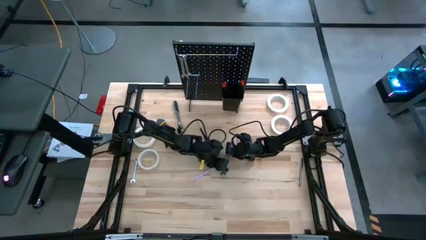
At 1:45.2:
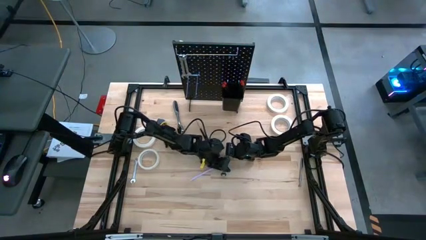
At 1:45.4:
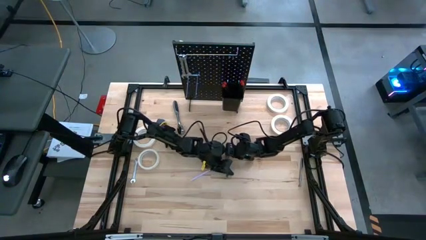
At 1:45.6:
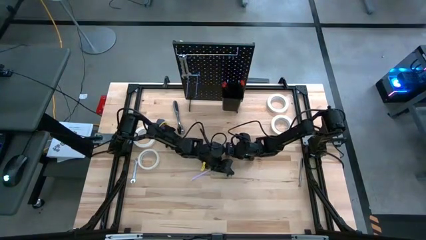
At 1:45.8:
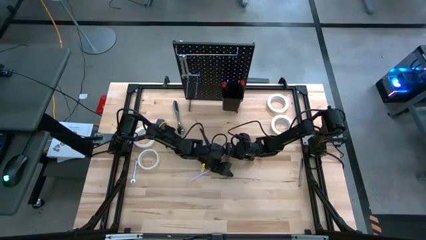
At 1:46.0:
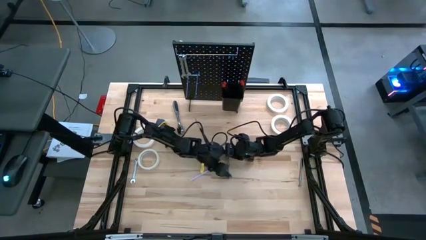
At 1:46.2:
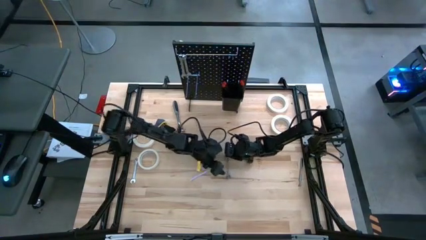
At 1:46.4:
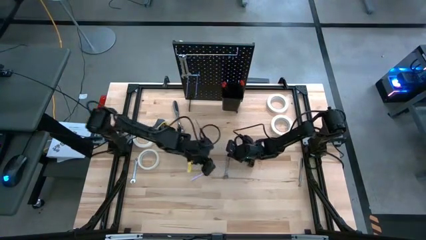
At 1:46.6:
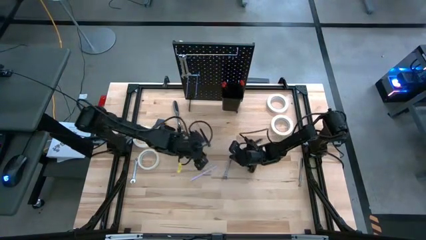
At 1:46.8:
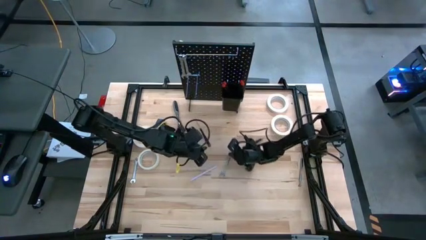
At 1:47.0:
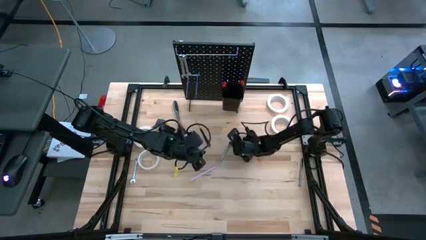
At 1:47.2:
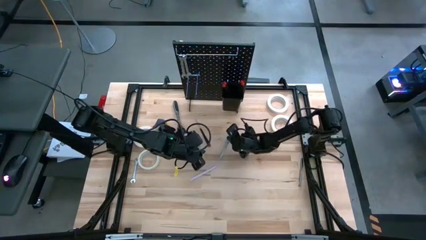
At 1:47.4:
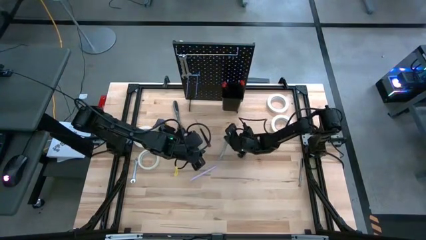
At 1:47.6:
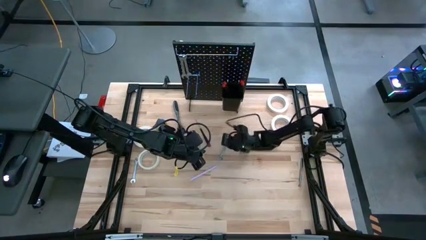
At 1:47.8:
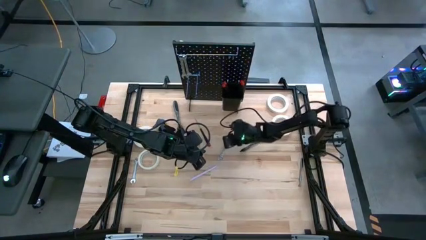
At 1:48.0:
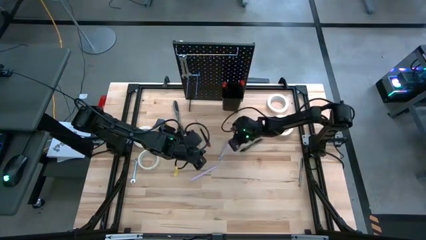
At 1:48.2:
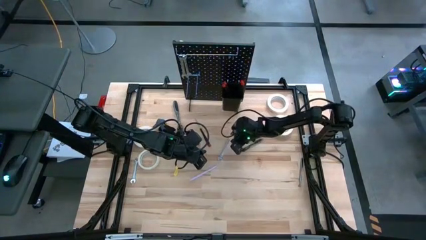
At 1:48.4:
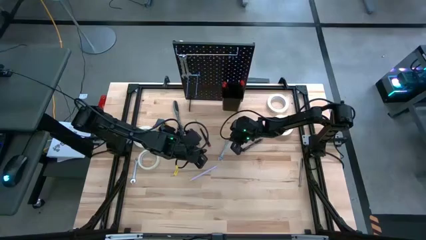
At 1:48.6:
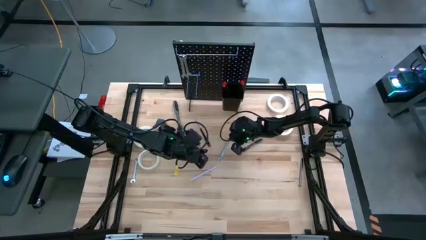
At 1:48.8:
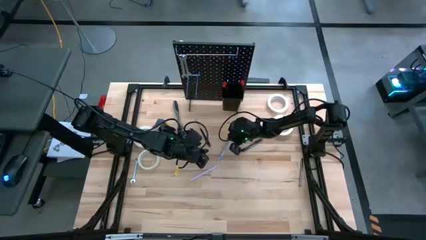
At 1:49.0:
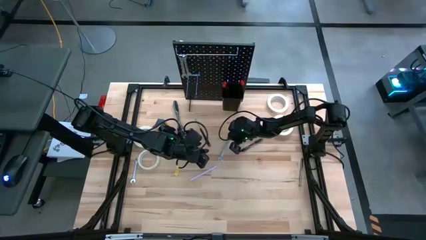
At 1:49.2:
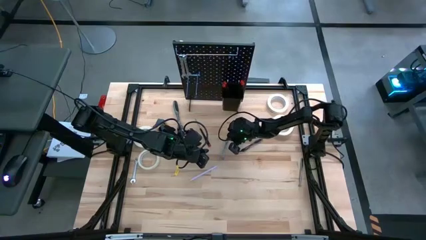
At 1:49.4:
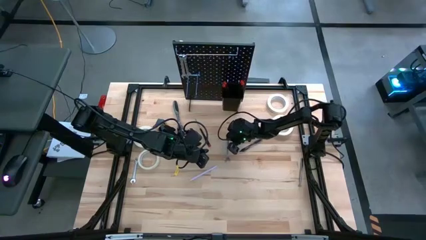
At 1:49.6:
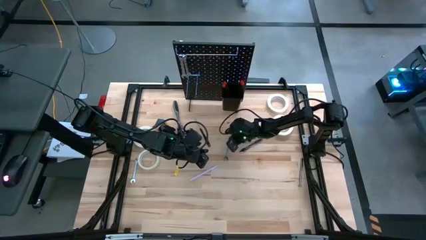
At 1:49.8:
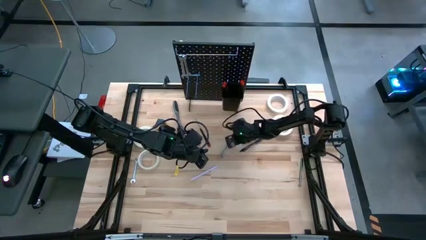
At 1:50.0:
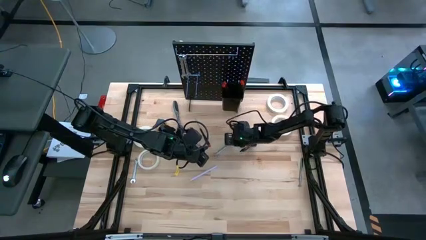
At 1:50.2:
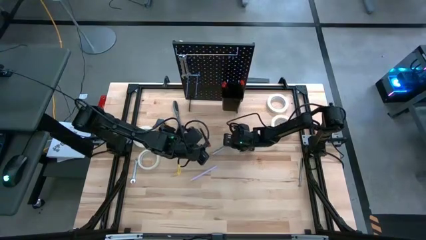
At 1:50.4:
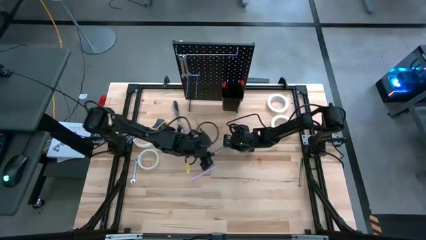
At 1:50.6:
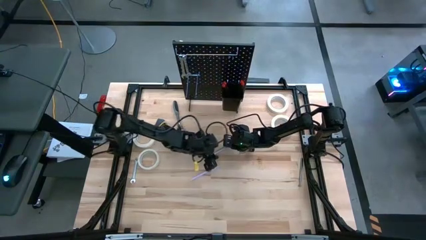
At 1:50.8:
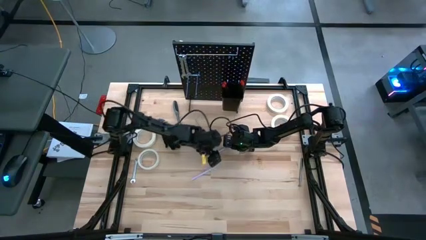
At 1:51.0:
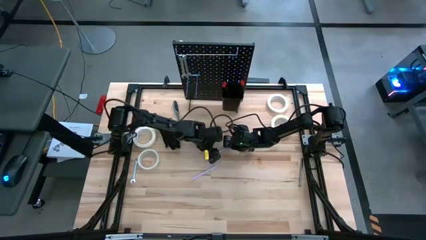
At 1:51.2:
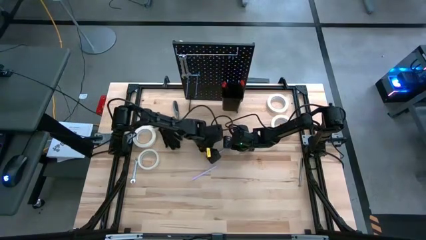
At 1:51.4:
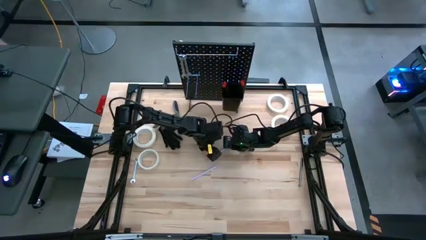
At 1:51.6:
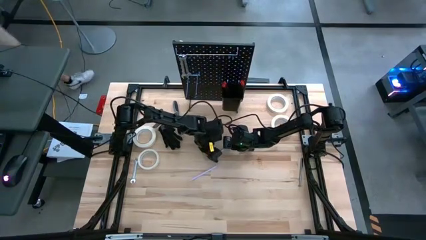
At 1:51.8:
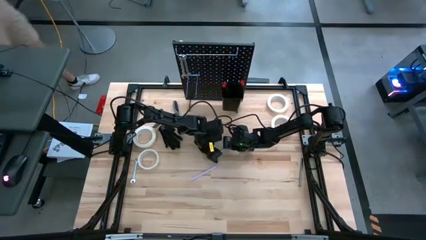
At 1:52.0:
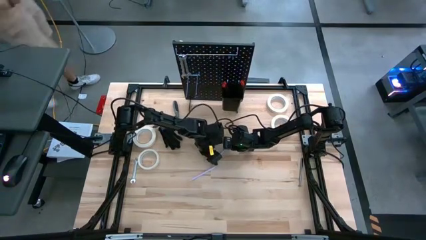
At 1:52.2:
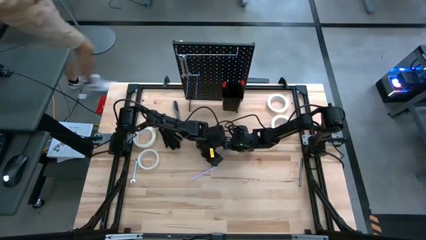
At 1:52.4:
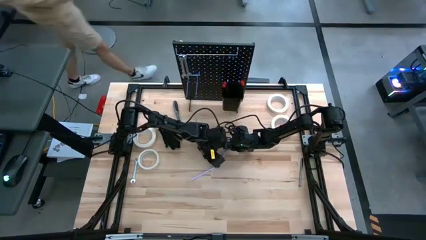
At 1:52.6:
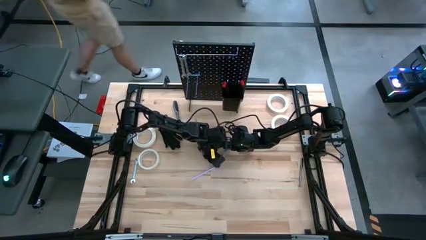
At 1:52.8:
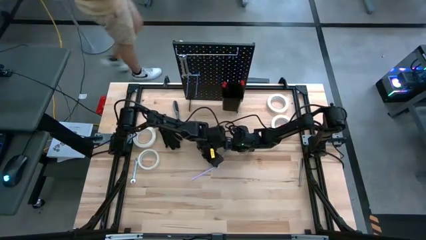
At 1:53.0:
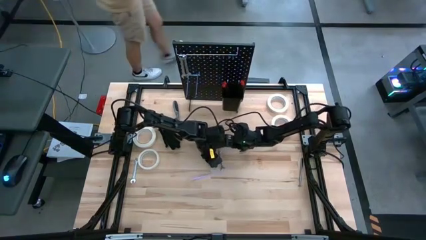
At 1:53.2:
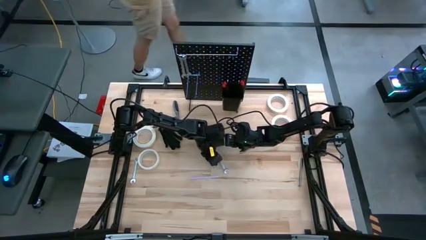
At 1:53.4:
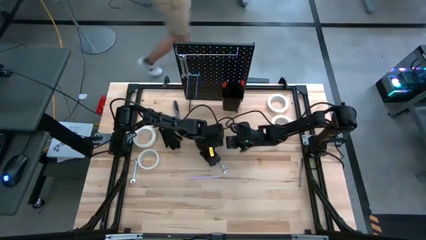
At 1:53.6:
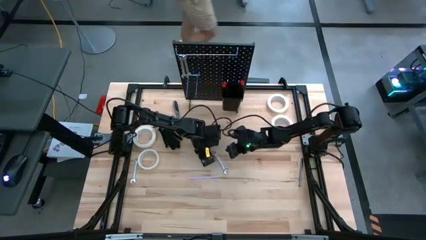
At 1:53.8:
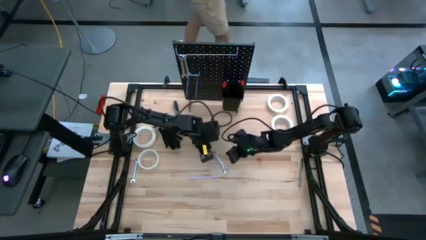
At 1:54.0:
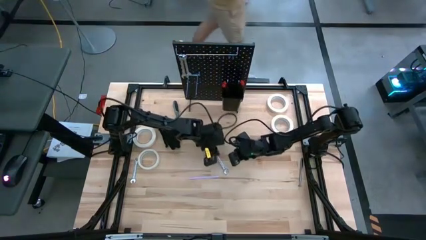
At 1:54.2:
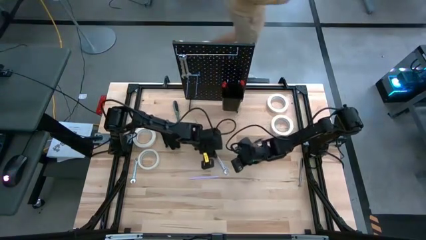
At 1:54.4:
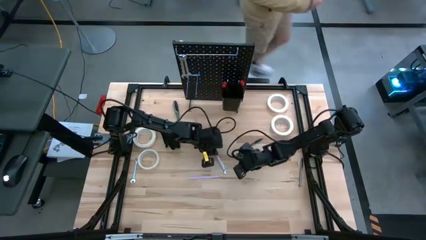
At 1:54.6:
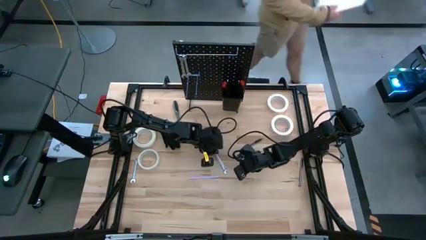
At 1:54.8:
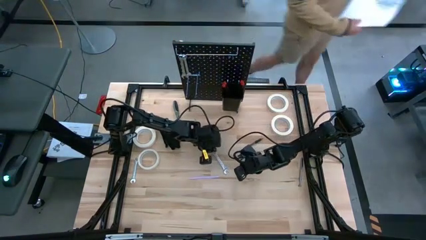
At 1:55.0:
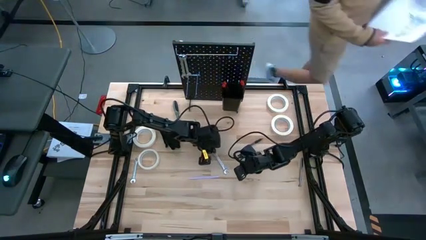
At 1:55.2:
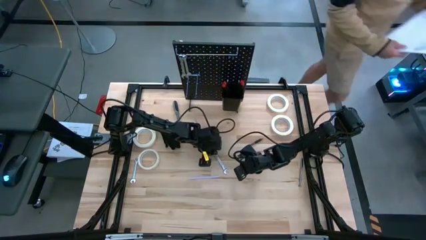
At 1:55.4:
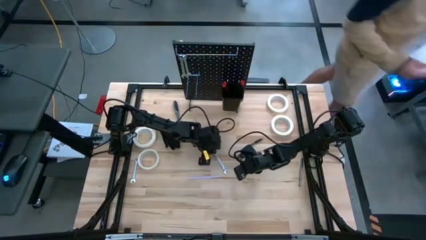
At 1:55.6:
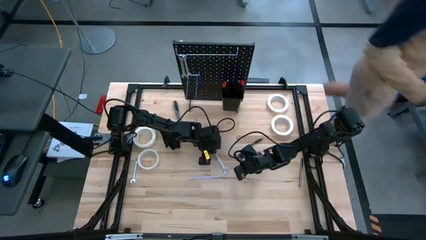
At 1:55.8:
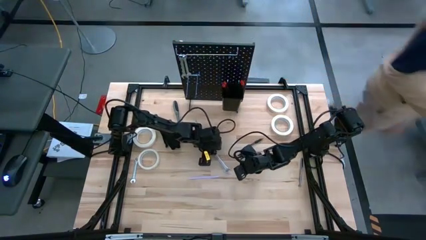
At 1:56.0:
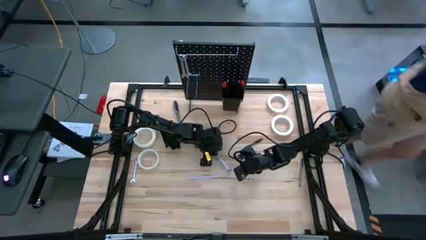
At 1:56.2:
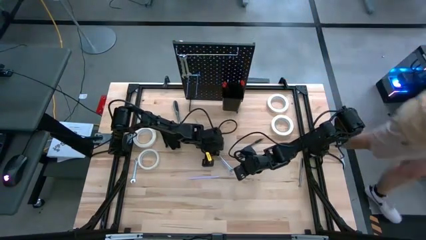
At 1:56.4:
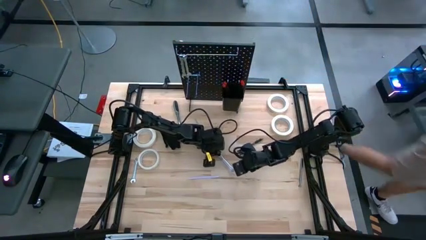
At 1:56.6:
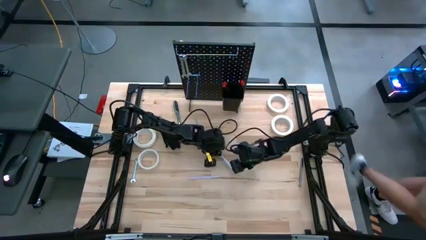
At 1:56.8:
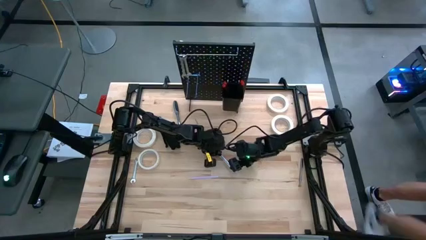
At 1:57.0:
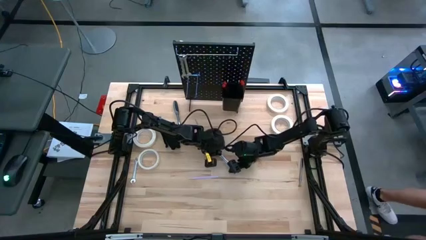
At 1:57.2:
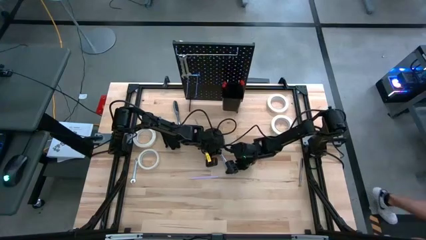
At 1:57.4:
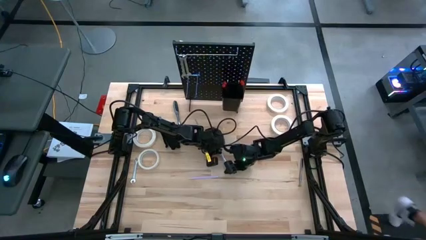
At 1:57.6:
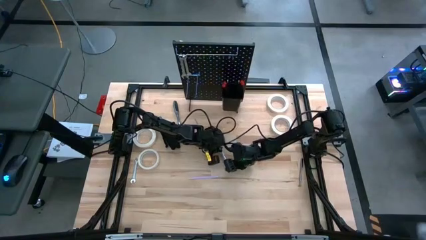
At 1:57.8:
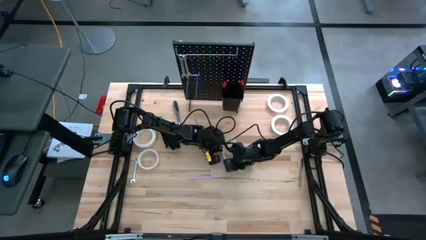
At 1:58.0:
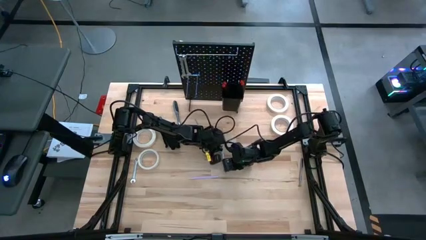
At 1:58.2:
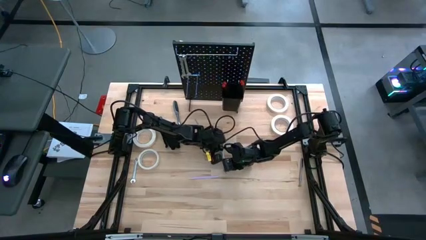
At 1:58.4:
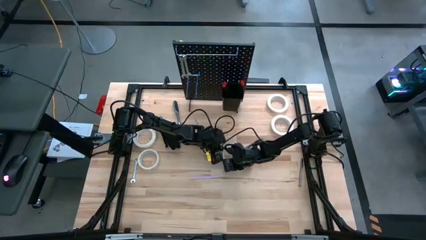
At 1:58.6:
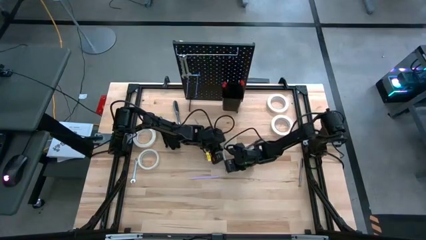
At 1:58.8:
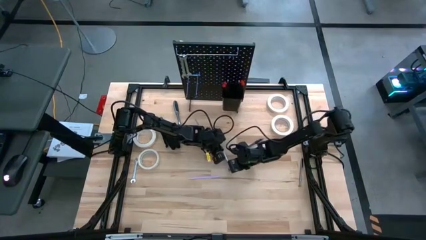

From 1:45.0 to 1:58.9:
Task: Hang tools onto peg board
Hang the wrench onto the peg board
